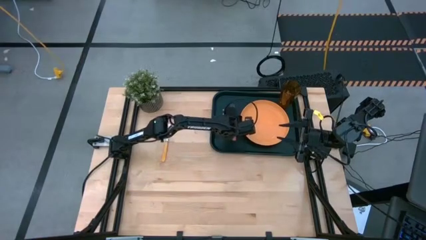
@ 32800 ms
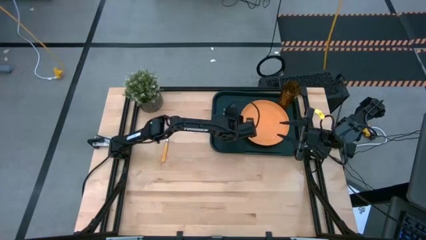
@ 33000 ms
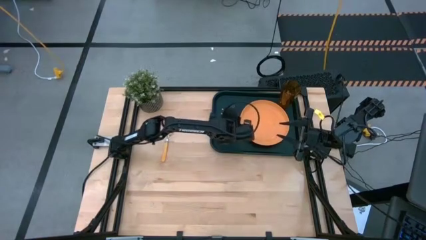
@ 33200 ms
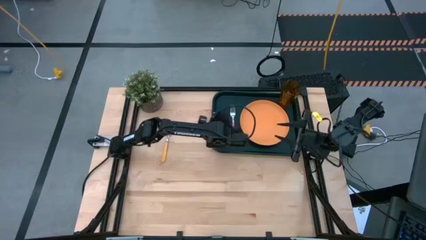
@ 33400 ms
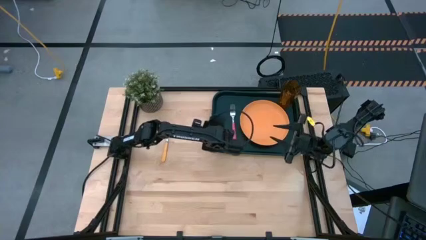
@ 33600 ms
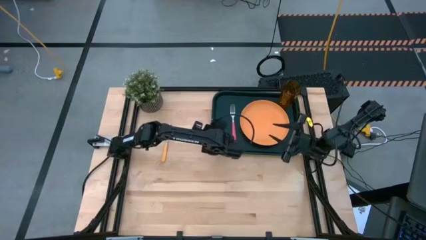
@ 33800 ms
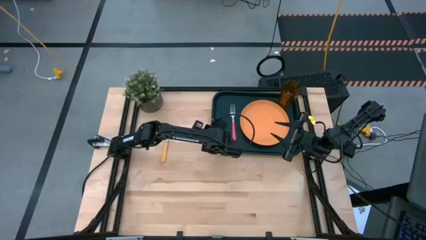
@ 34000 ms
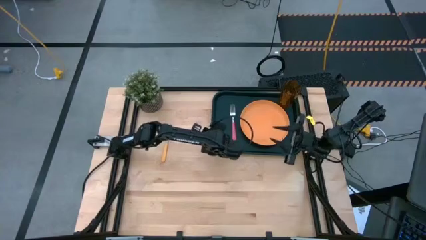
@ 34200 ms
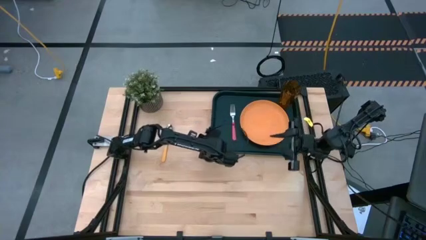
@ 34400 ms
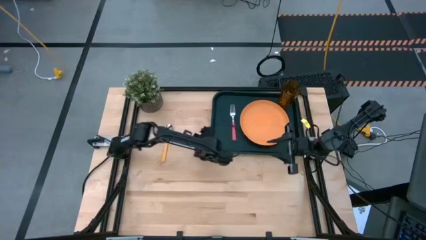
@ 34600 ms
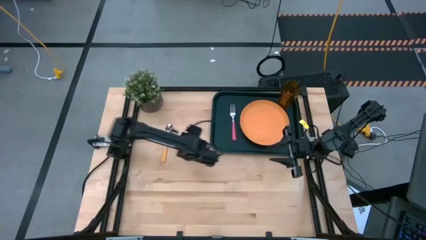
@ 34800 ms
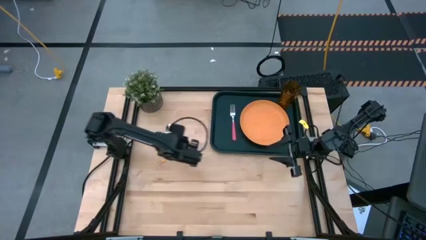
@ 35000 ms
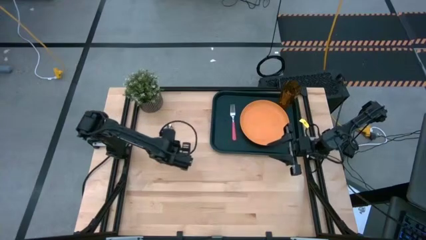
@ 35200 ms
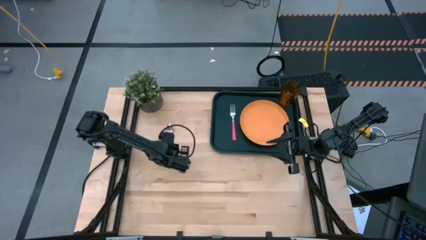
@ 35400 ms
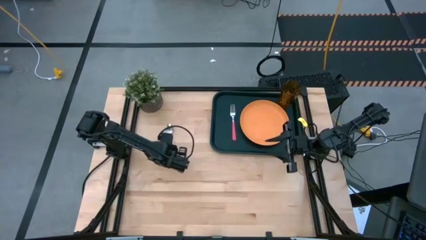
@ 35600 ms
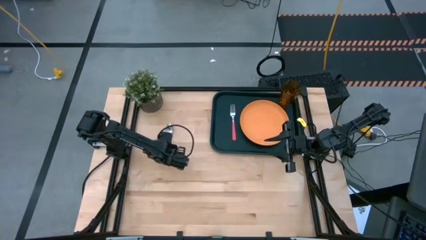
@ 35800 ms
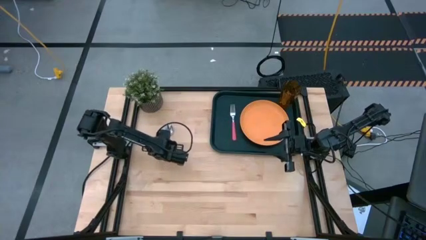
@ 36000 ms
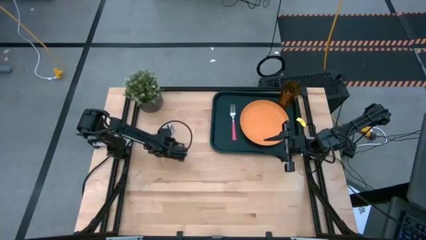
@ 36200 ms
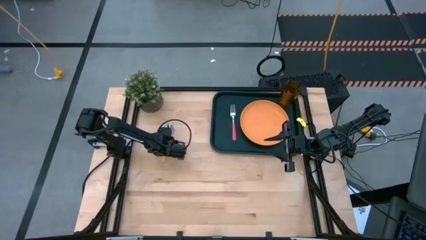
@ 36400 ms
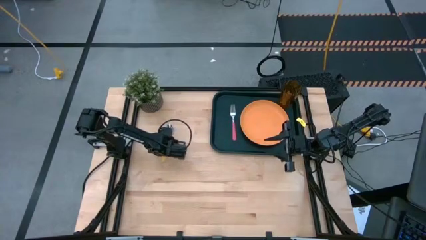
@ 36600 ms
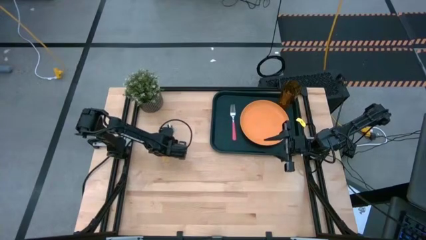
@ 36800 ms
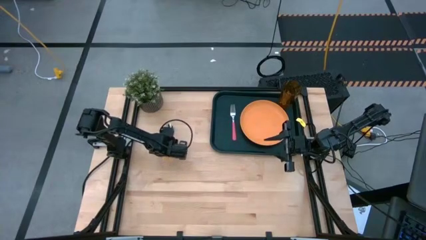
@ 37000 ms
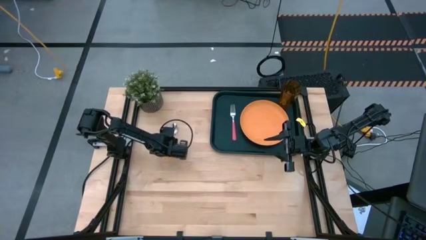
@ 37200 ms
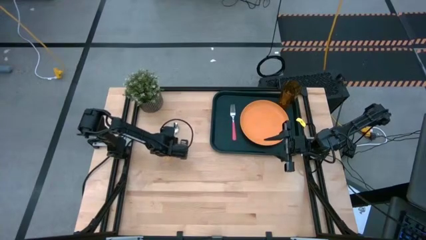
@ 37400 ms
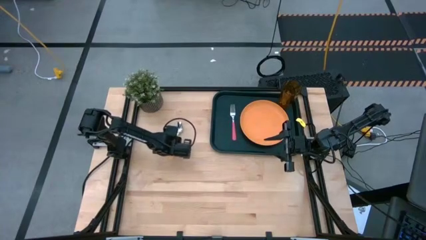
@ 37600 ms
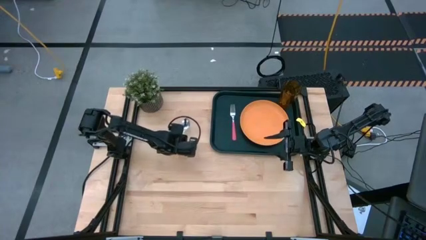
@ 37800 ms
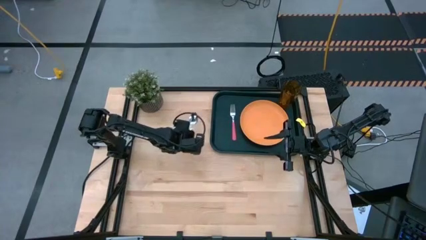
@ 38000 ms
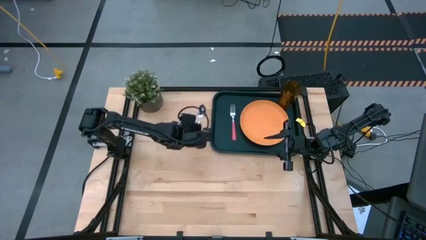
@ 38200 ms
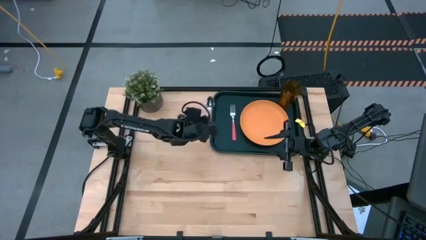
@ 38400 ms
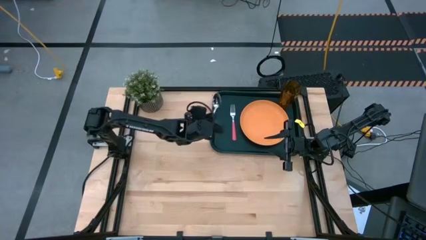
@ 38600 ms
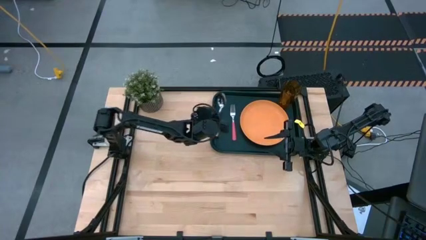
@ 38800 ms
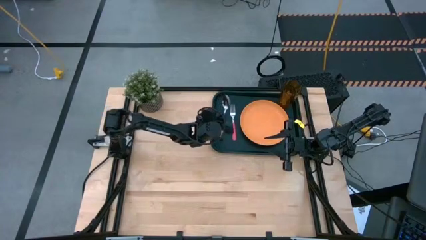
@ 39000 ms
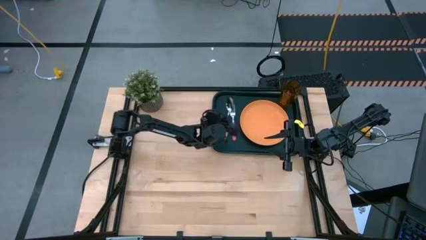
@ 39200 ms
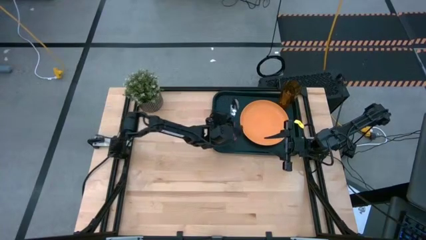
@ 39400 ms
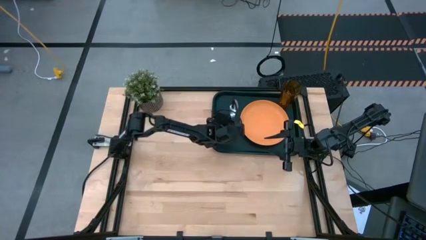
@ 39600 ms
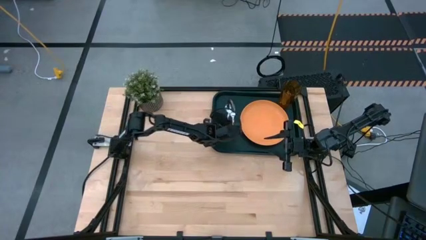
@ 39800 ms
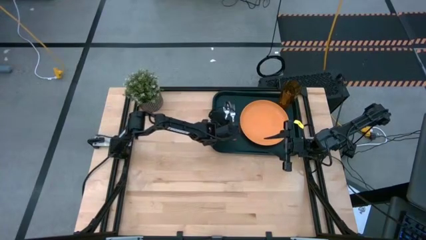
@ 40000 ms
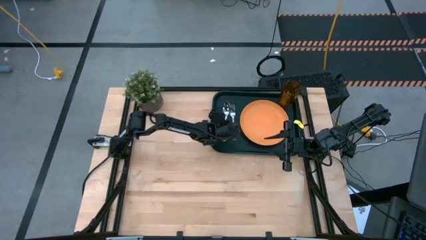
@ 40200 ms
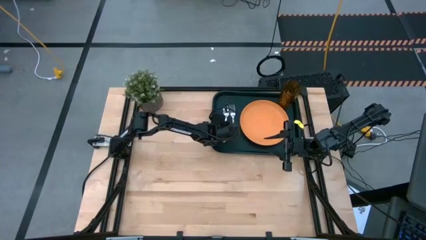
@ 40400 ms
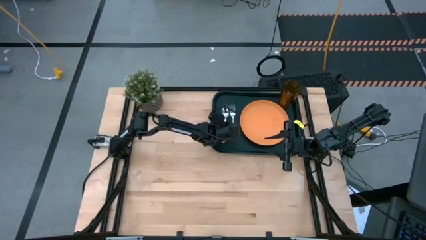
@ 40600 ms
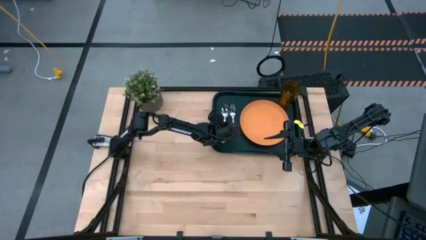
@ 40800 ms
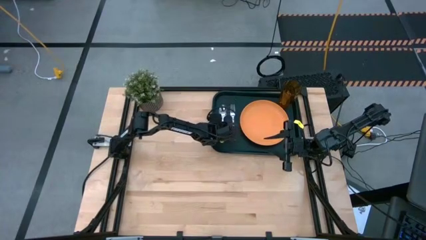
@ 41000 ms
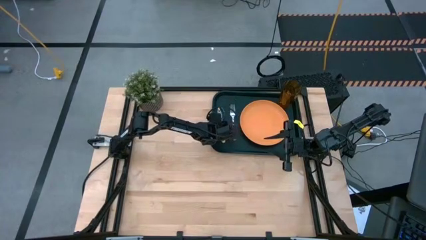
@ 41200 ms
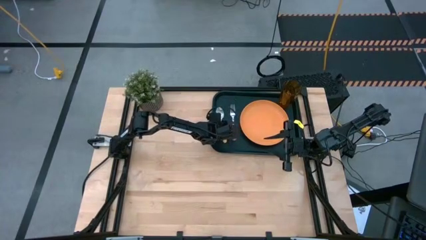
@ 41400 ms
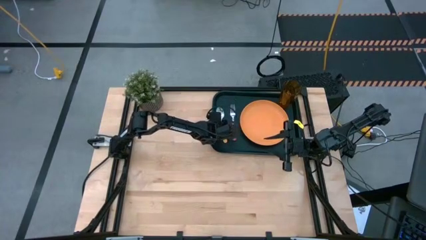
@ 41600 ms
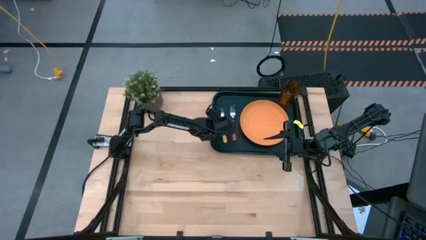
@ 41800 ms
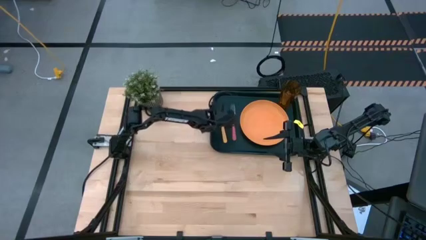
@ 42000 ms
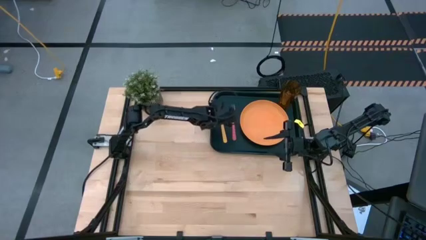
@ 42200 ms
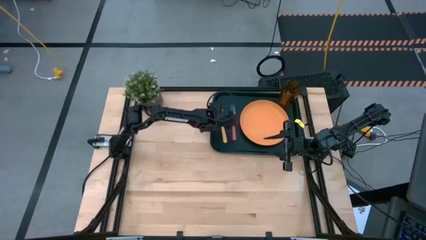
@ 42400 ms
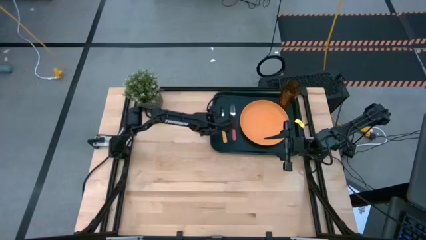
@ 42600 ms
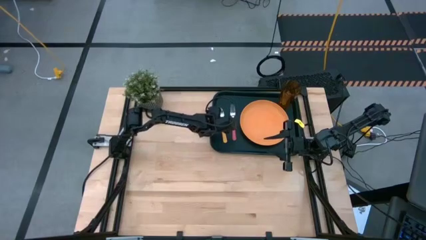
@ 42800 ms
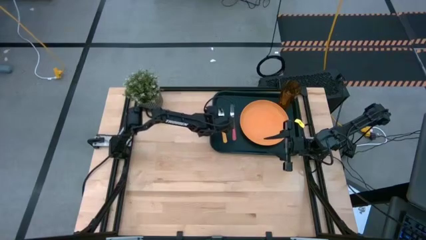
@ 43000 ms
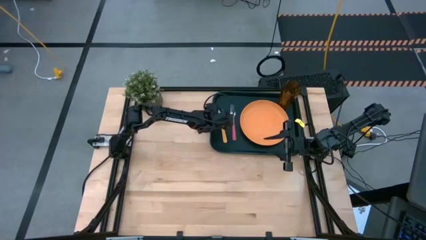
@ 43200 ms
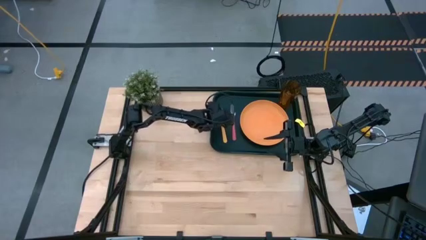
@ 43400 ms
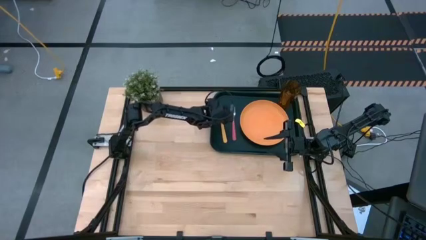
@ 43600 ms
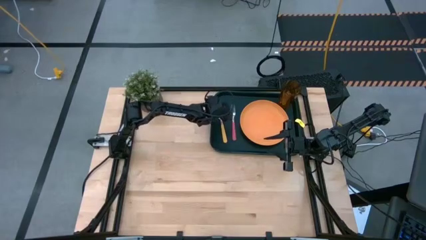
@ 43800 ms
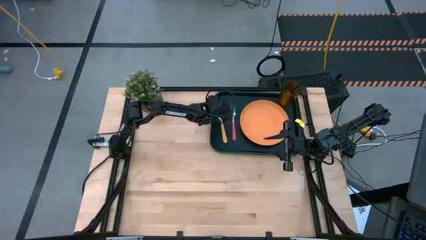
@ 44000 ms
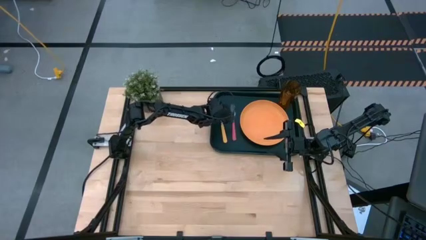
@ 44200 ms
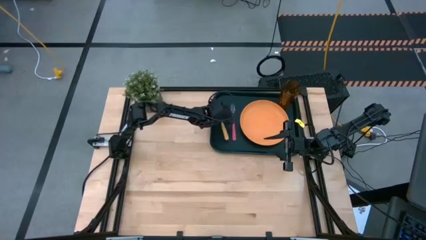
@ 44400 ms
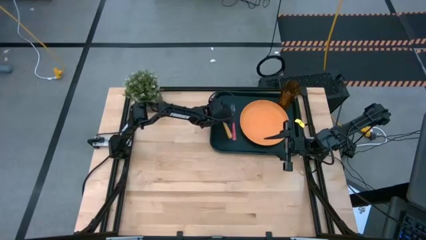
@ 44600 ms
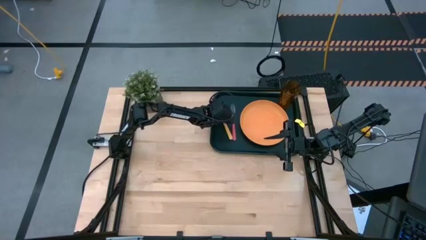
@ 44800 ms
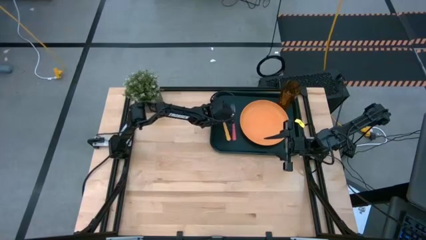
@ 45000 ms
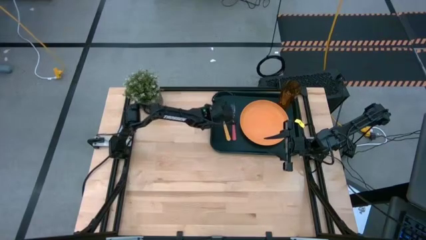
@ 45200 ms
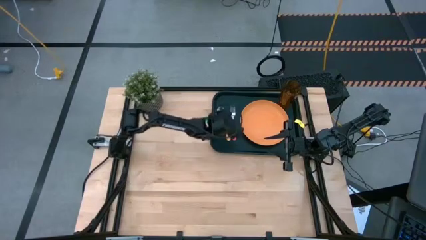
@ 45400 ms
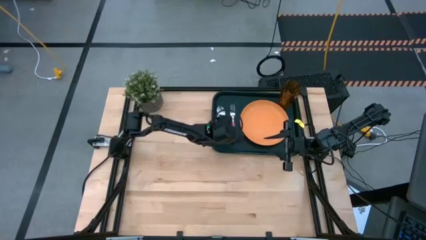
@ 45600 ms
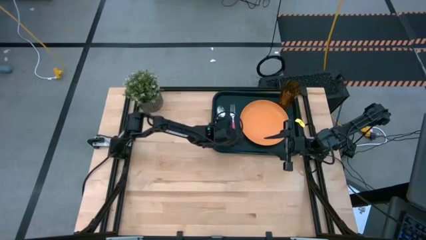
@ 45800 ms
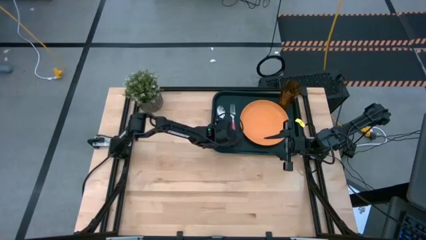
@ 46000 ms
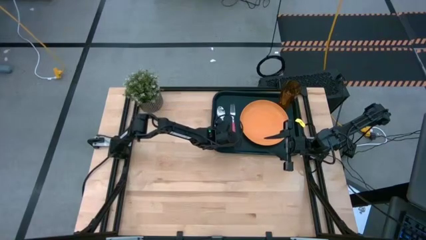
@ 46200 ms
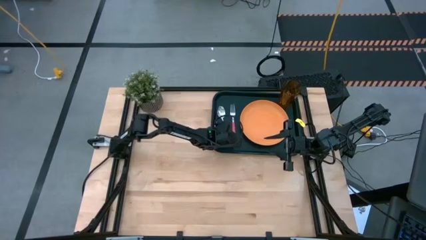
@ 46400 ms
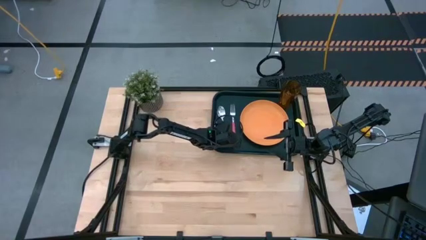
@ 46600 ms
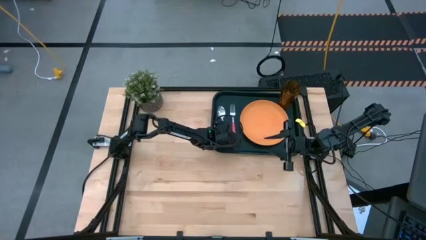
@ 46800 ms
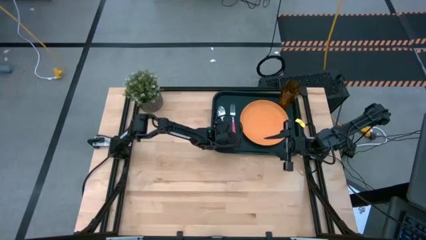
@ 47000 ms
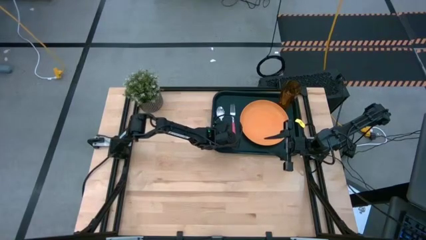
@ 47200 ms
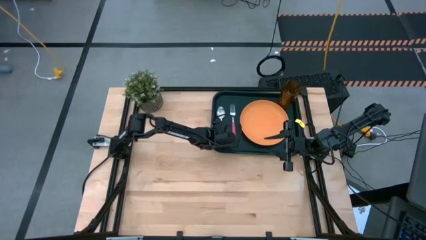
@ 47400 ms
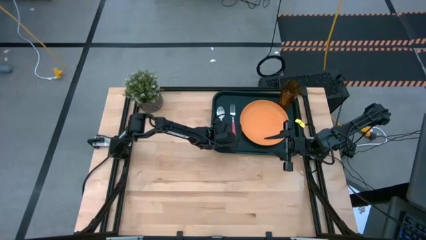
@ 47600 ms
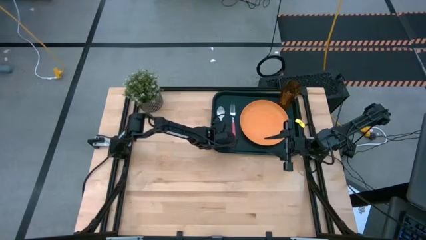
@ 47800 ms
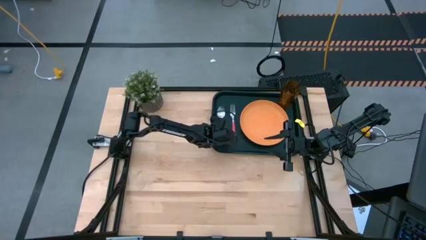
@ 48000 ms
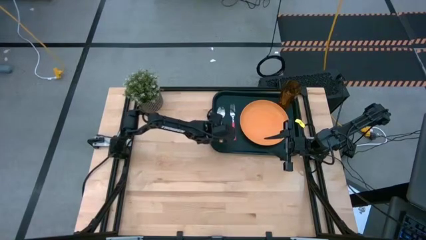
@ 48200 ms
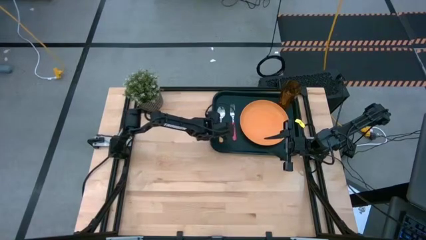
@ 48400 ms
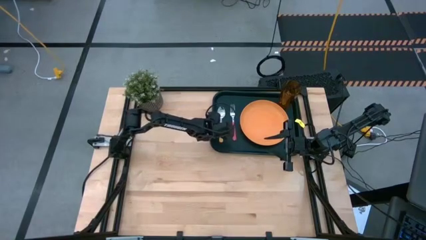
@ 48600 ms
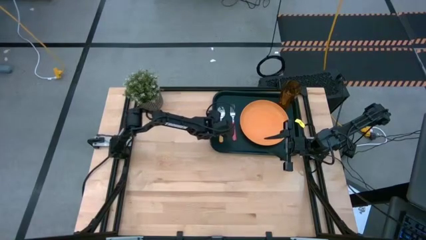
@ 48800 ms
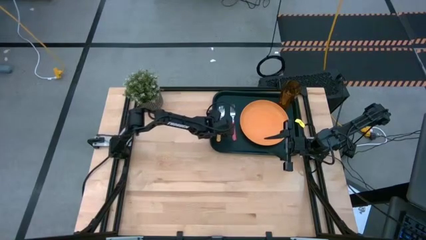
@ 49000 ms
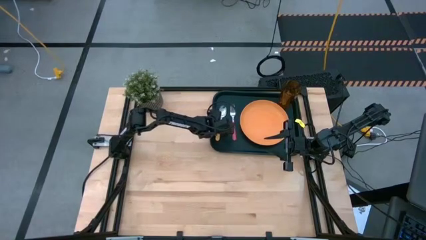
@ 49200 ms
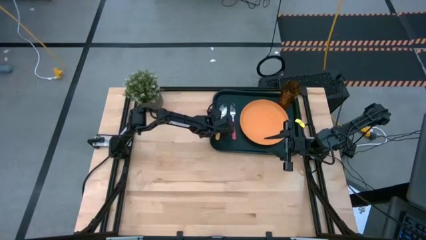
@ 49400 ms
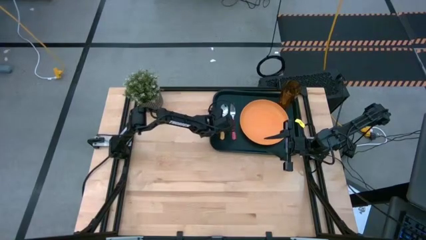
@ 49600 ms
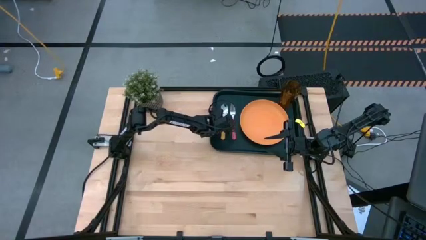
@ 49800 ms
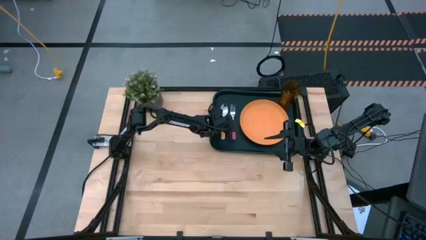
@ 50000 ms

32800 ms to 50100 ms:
Task: Pick and place plate/cup/fork/spoon on tray
Put the spoon on the tray
